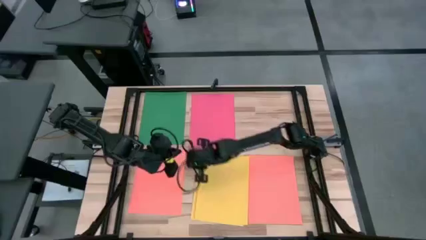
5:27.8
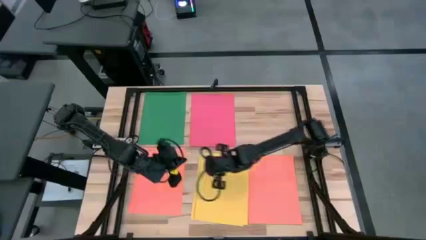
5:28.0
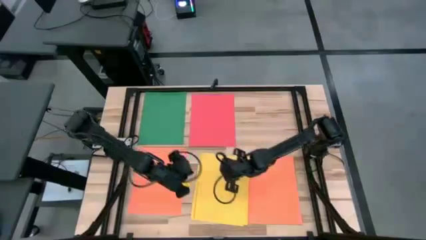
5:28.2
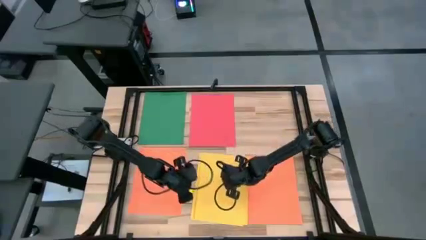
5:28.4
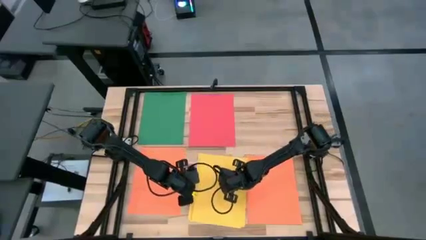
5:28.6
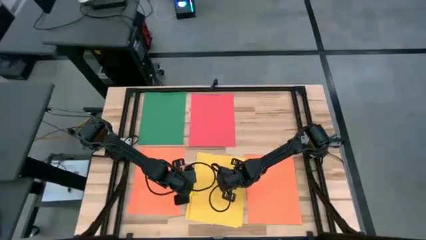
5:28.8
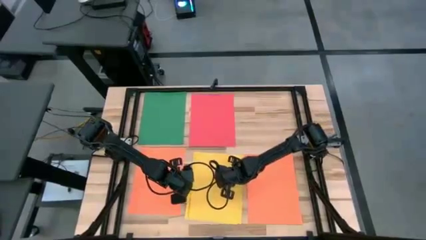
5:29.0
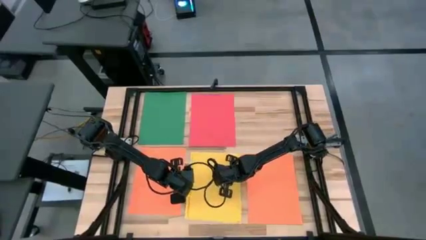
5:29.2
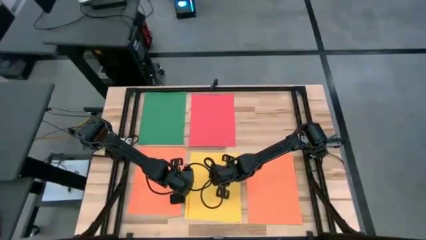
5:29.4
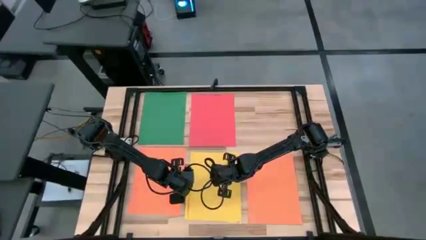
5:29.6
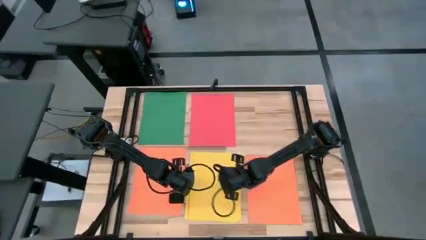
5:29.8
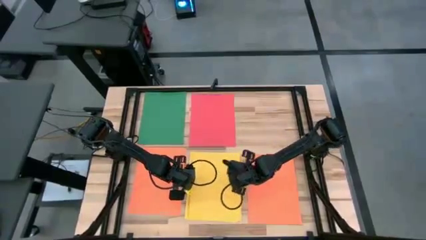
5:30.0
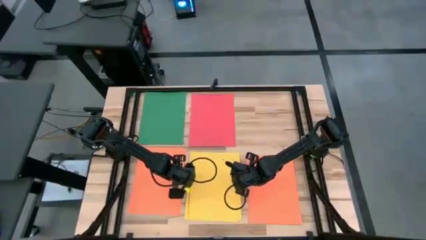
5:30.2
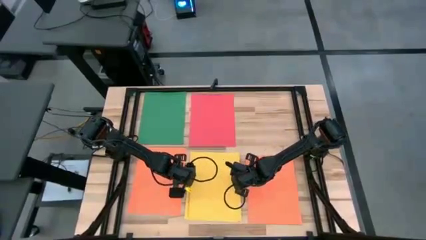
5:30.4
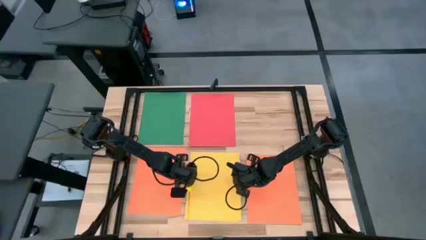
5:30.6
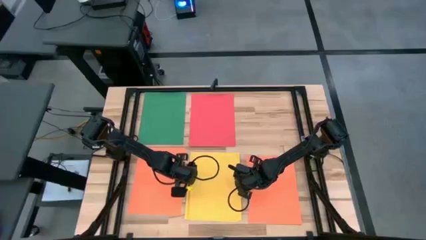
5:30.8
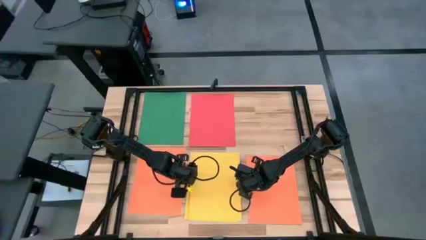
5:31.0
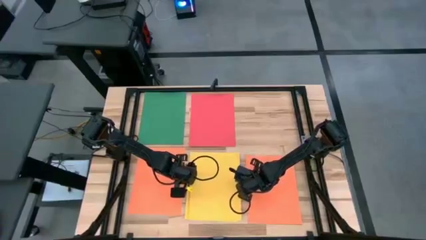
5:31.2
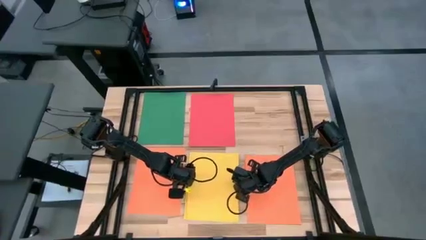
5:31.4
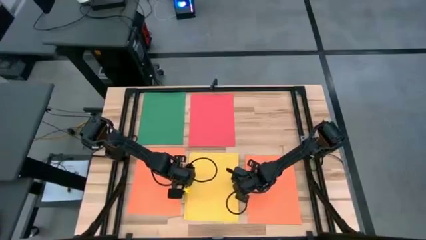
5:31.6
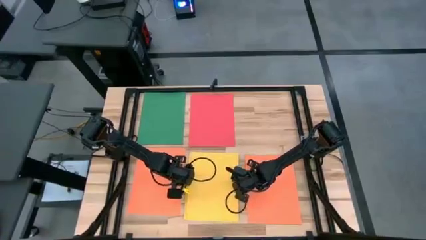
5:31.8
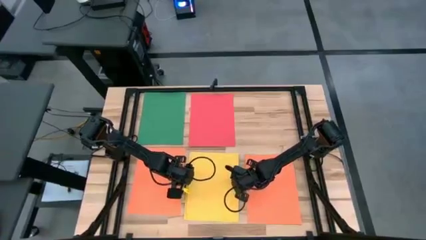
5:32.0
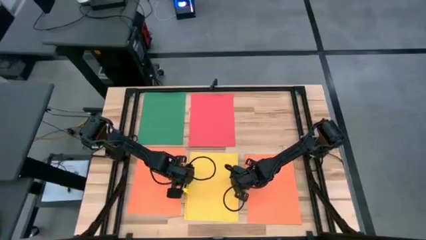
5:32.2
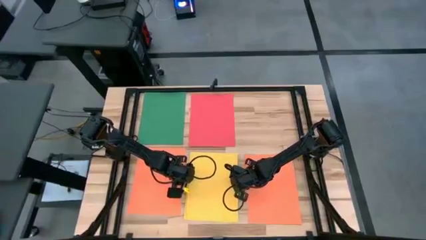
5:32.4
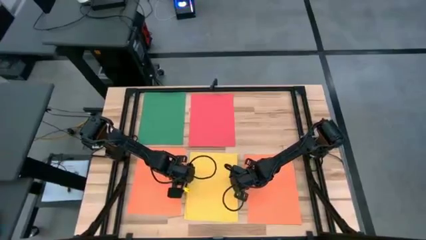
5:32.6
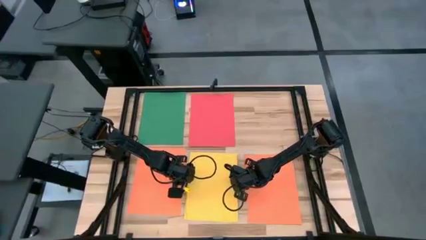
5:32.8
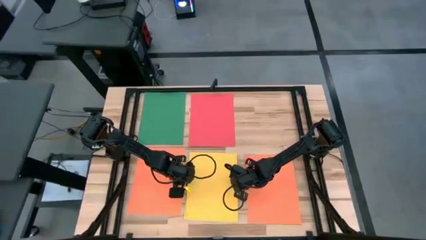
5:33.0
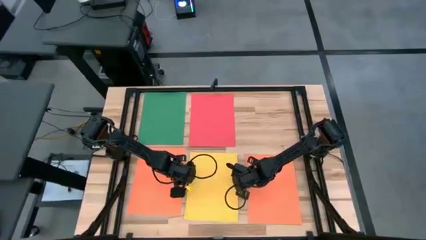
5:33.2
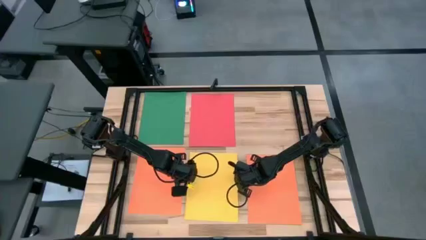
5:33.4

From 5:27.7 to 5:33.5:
Task: Organize paper
Adjust the yellow paper

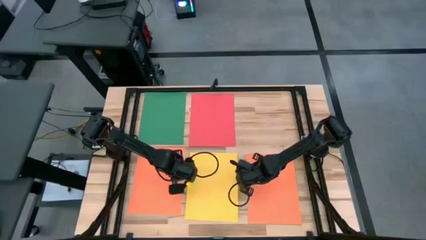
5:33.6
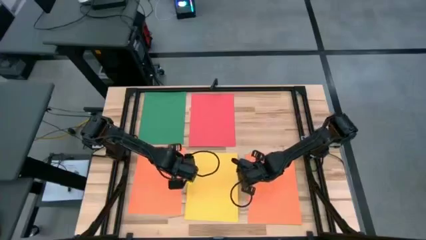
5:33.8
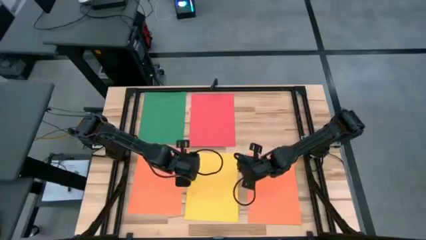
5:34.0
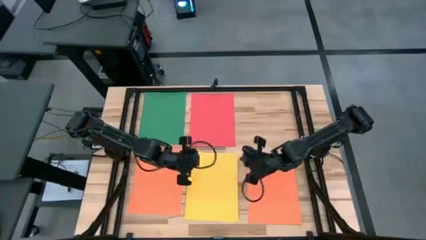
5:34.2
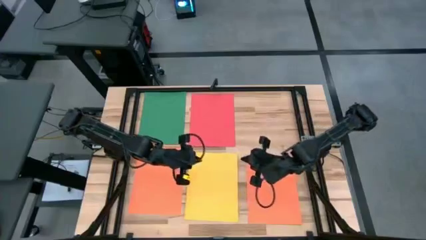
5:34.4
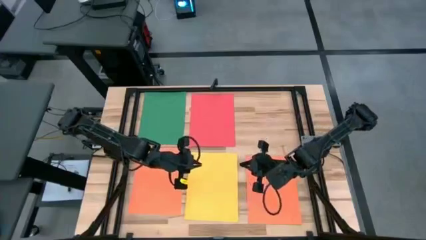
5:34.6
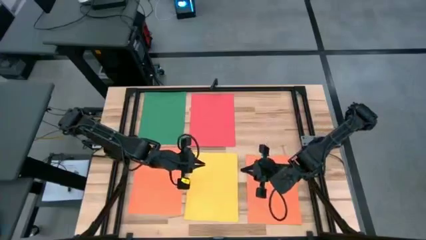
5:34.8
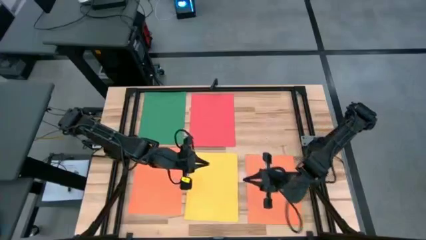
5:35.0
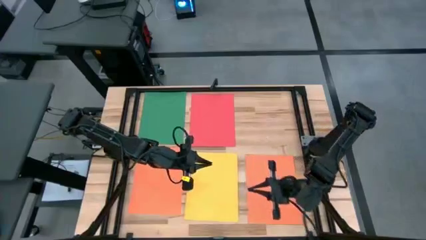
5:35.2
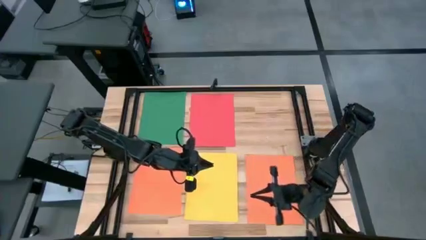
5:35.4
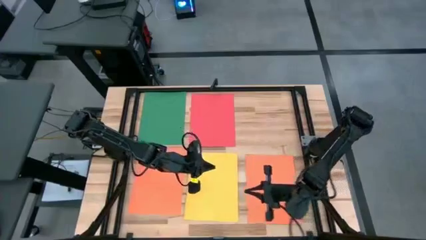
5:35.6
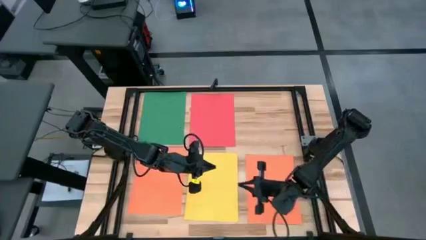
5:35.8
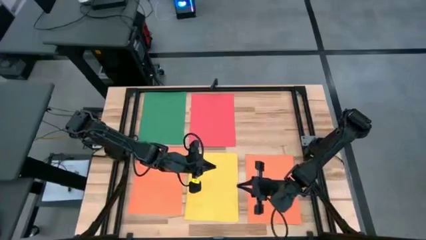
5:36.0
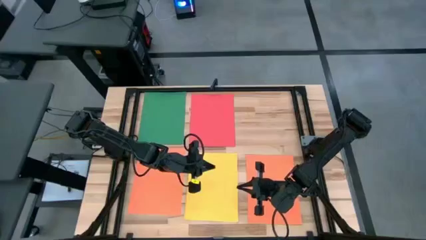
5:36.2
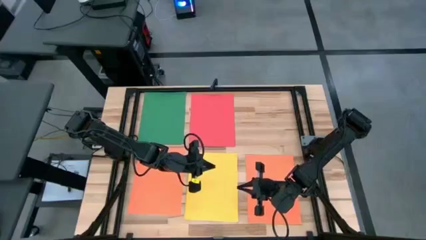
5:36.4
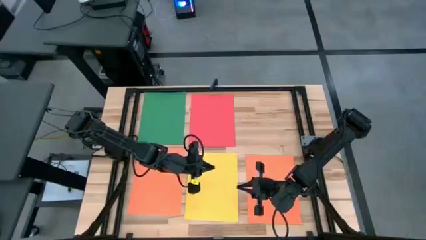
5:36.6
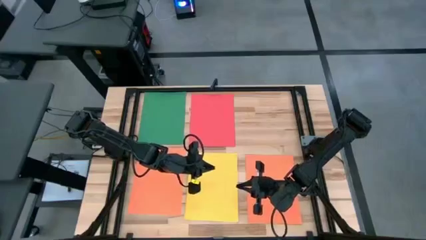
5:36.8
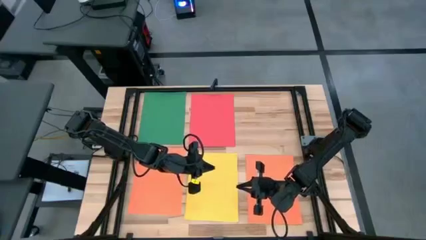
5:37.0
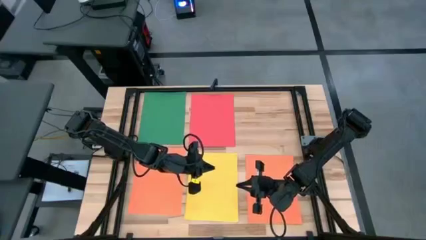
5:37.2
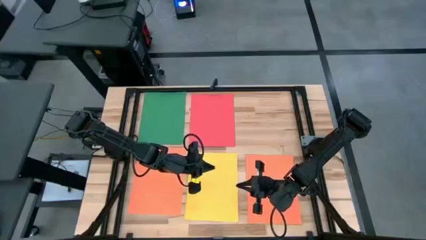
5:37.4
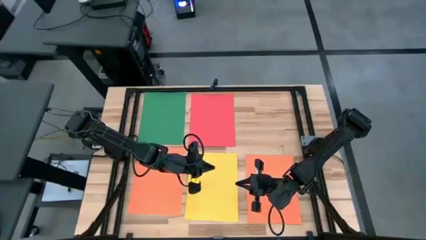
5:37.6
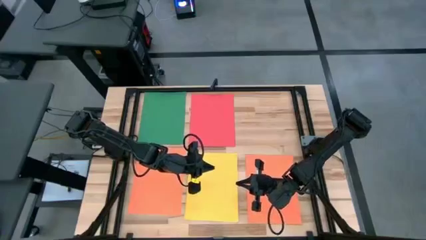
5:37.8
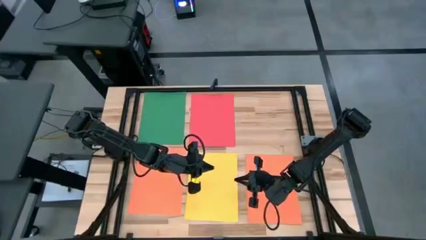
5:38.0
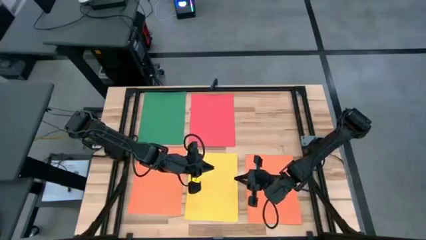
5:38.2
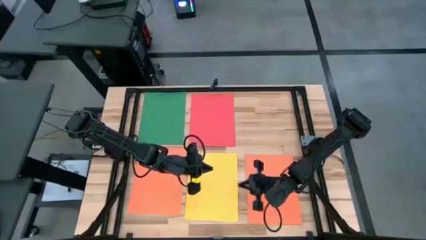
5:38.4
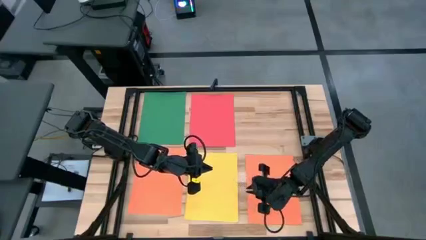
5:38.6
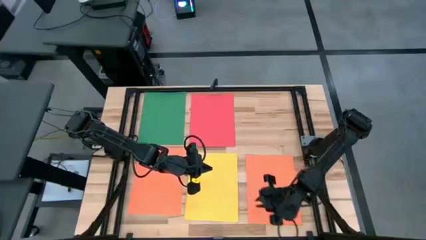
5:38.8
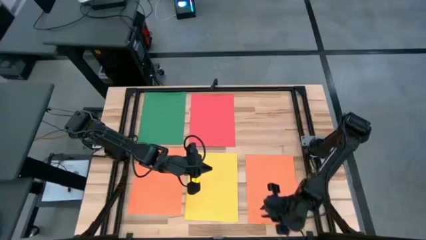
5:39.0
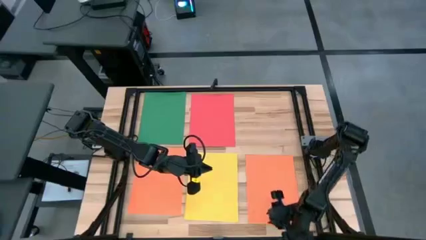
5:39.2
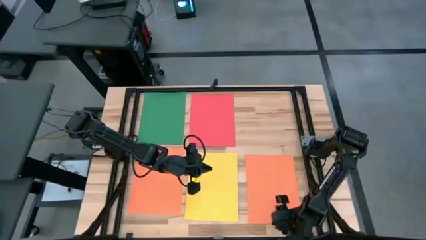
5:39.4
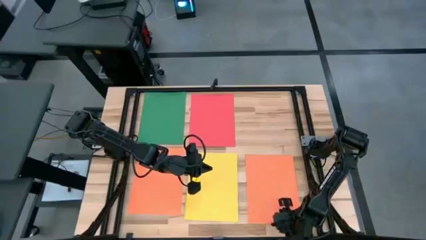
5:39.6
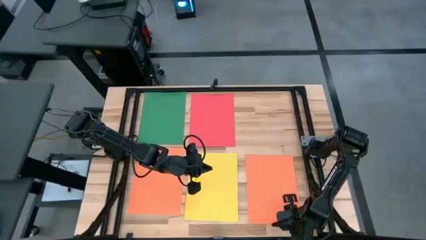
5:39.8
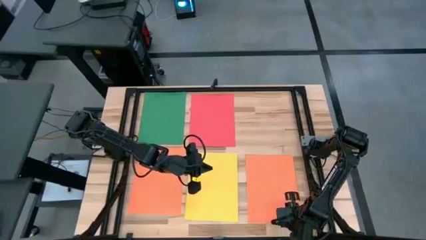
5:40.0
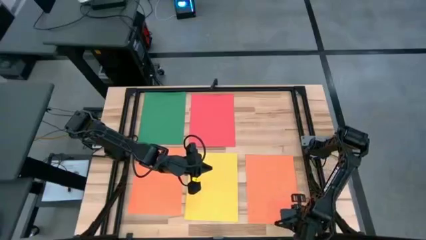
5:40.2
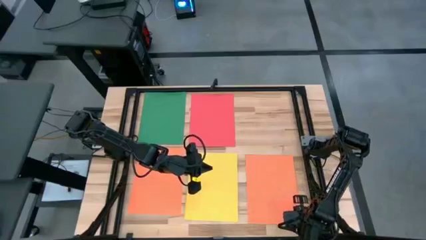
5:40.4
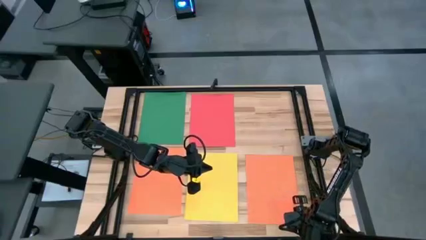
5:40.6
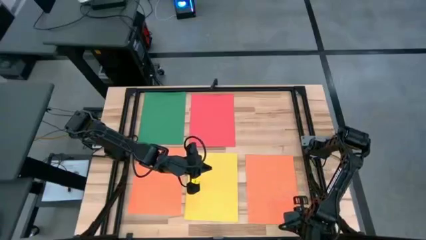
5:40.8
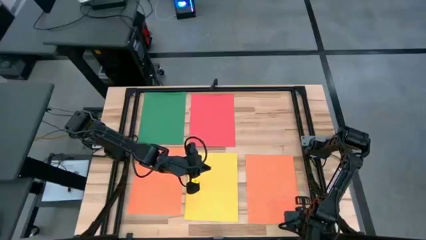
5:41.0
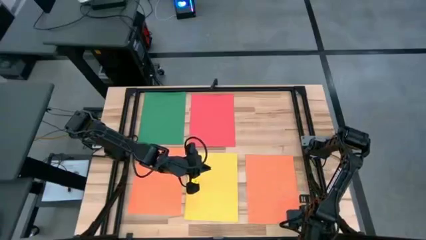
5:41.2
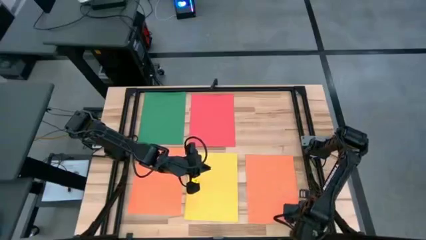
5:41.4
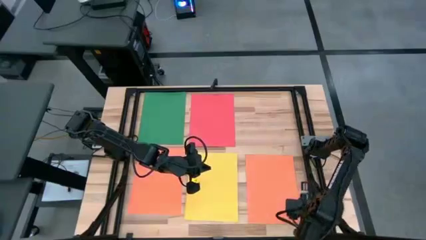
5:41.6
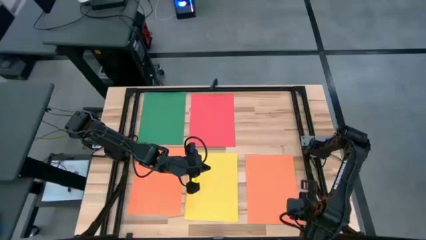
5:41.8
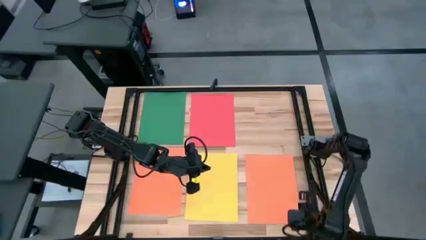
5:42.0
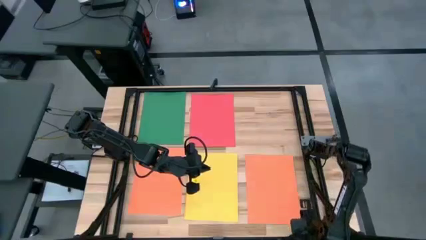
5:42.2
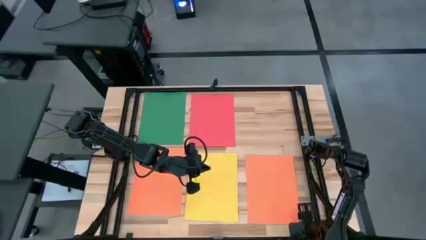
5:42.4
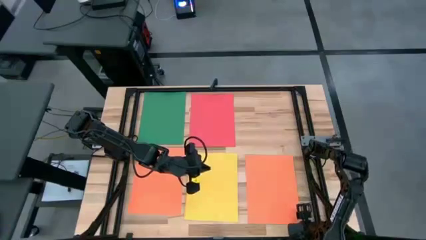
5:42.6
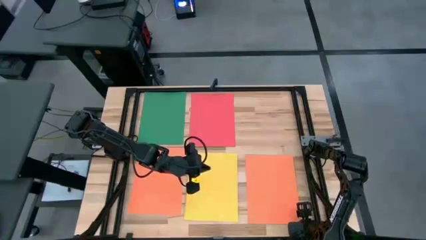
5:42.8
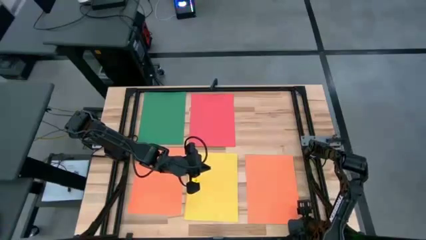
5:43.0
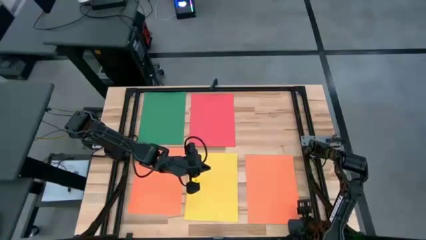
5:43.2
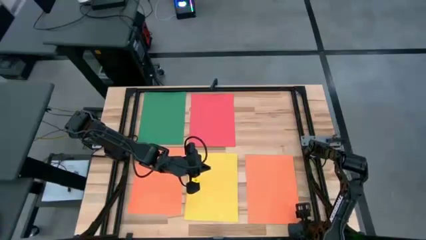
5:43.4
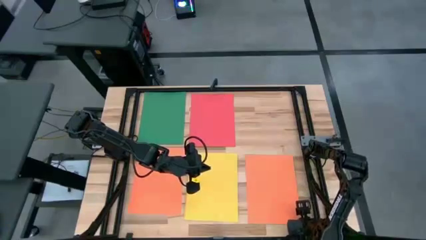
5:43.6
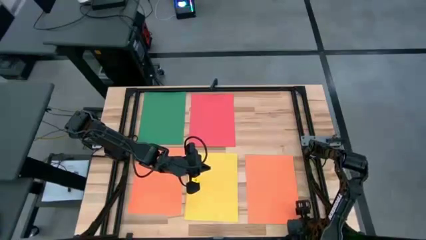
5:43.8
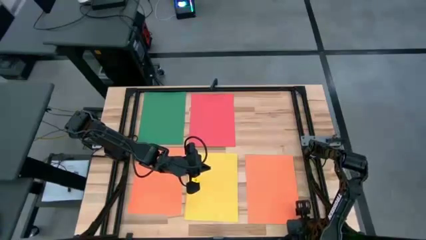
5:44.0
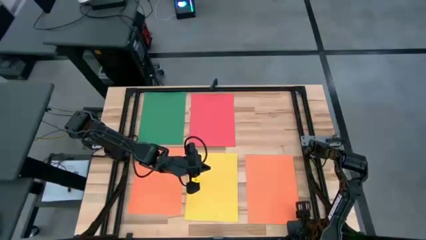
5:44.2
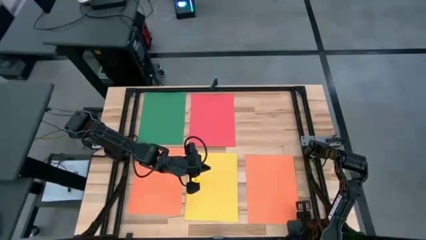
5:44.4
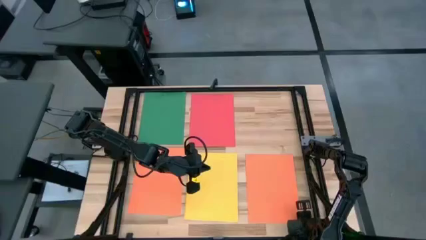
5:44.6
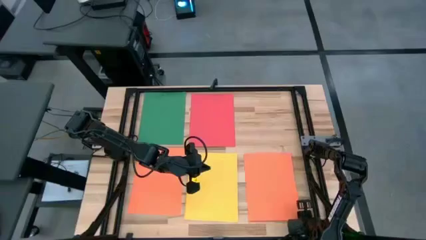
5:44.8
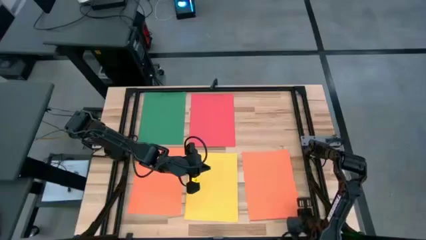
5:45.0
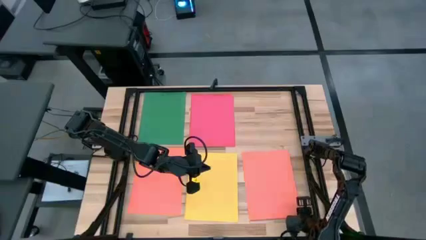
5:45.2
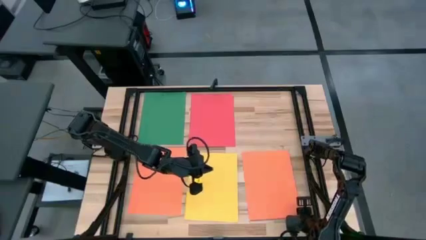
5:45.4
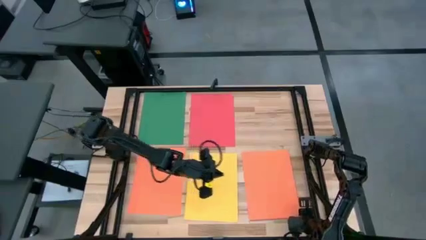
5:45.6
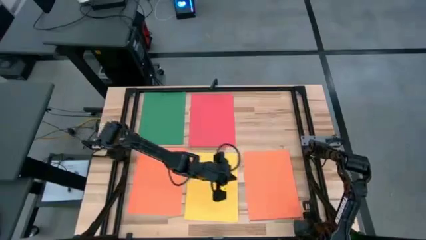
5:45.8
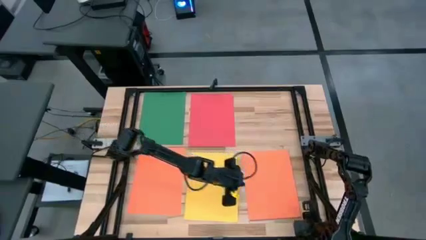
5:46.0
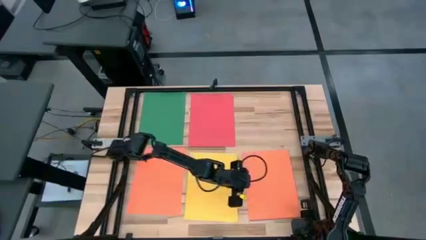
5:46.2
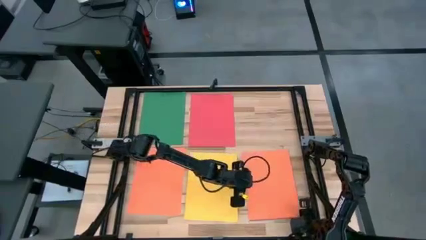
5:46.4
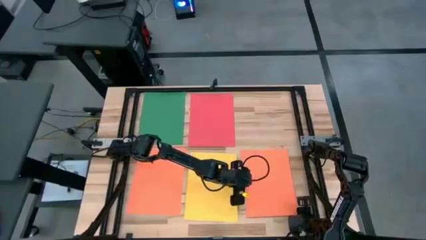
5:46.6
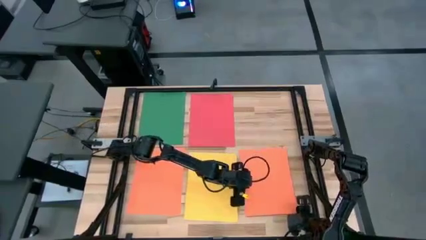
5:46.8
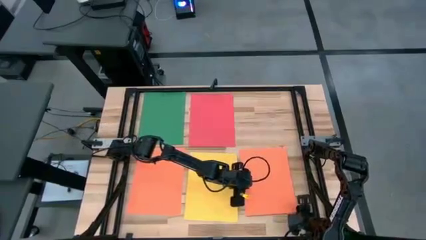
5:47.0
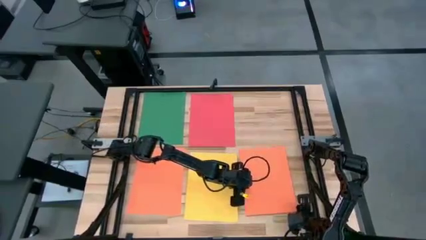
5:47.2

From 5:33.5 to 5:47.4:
Stack the orange paper on top of the orange paper
